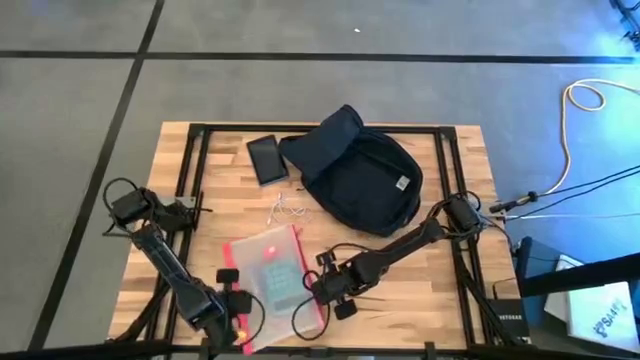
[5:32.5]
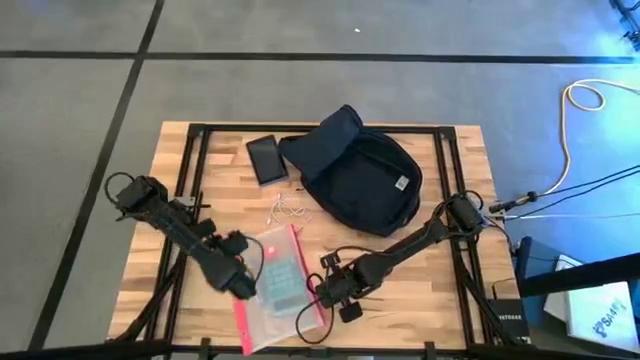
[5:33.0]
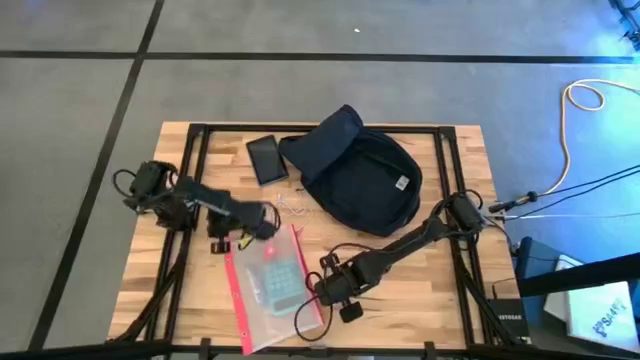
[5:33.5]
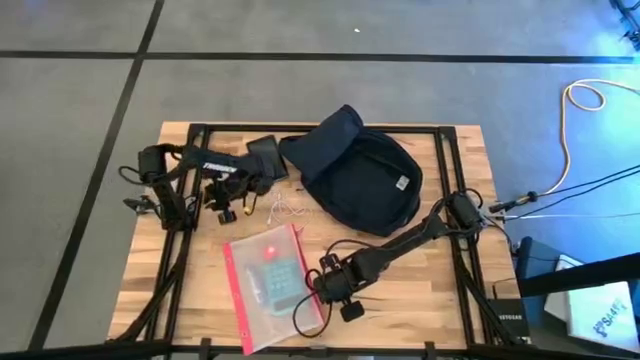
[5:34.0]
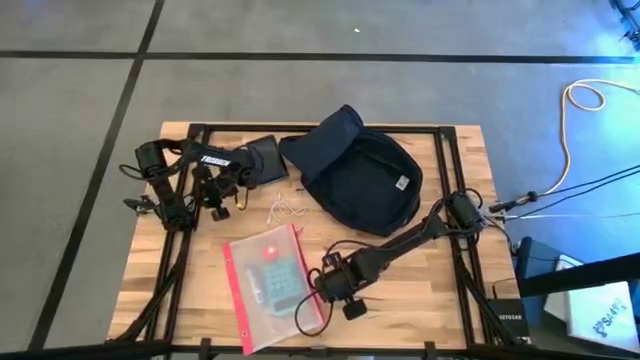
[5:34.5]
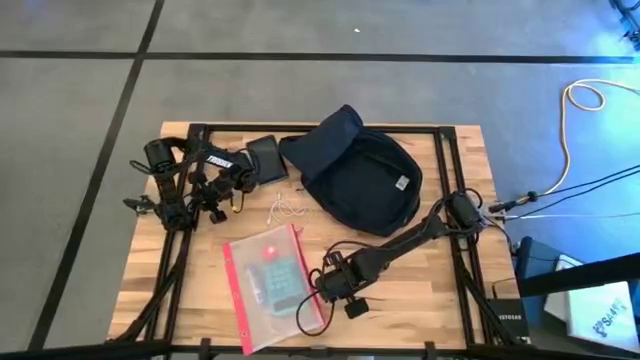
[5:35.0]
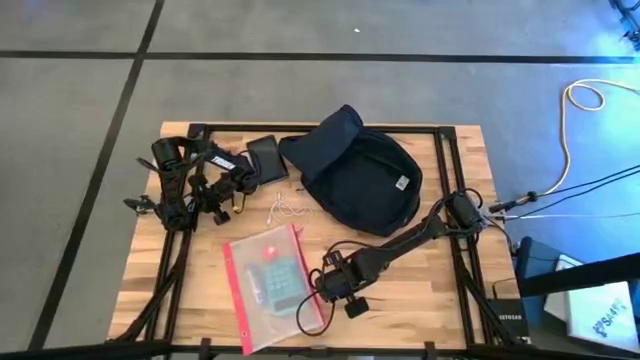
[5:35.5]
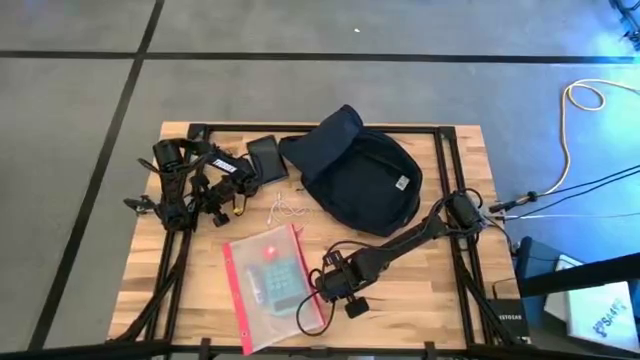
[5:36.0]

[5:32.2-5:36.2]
Task: Unpack backpack
Put the black pen into the transparent zip bag

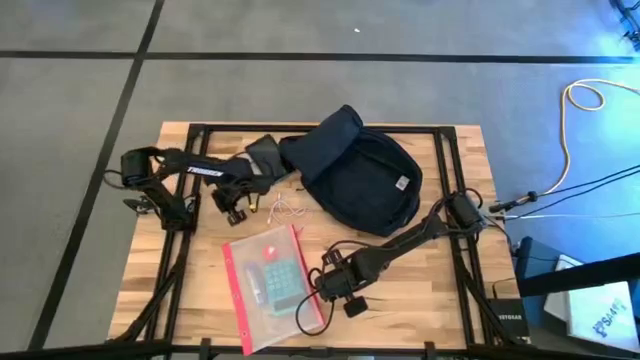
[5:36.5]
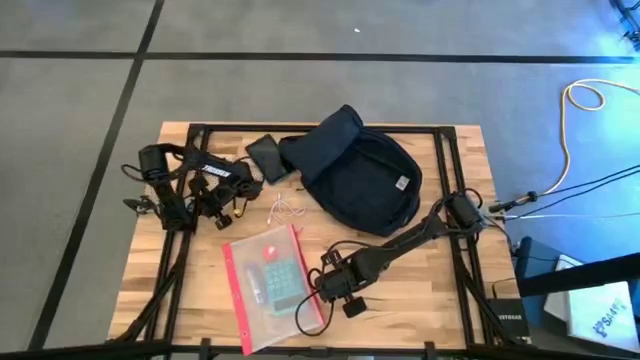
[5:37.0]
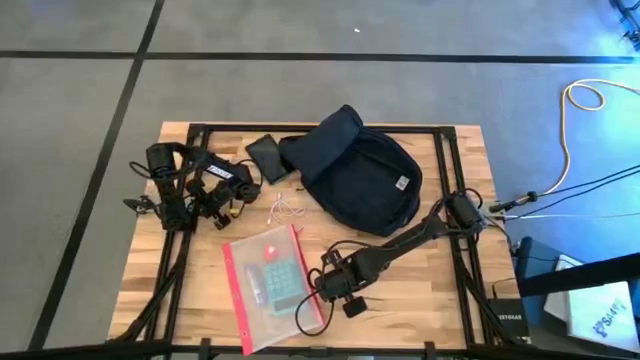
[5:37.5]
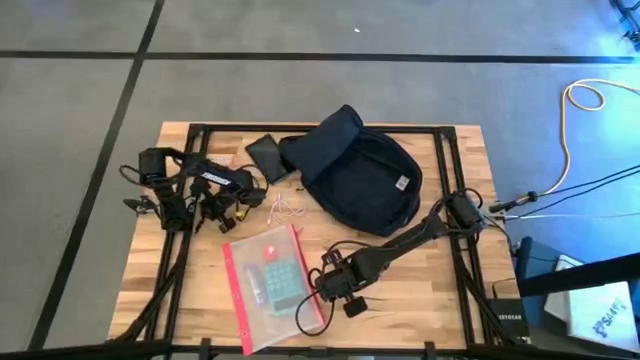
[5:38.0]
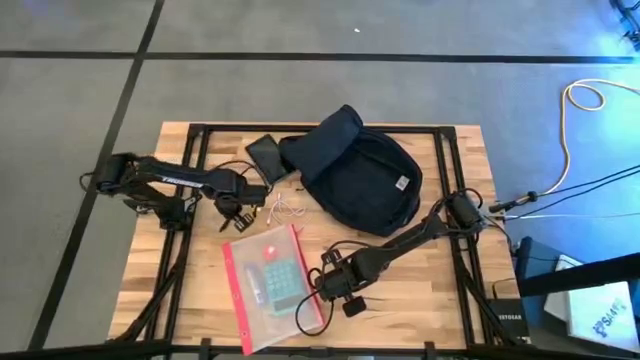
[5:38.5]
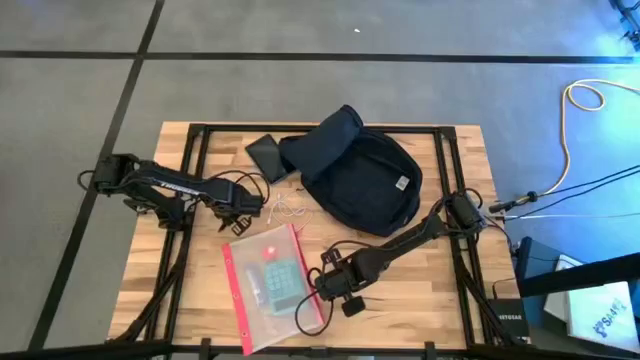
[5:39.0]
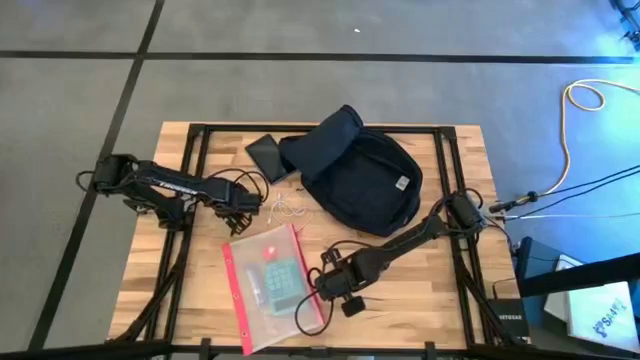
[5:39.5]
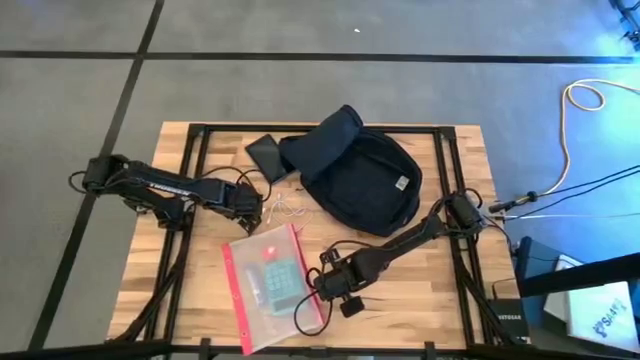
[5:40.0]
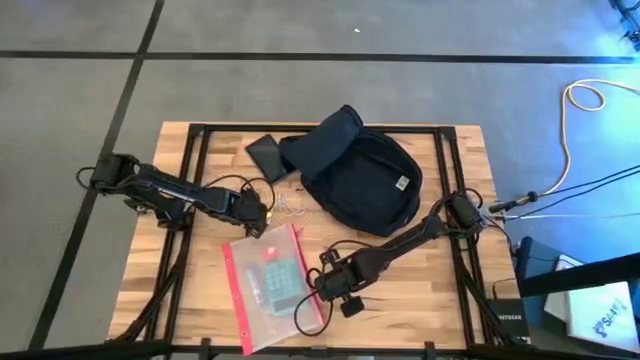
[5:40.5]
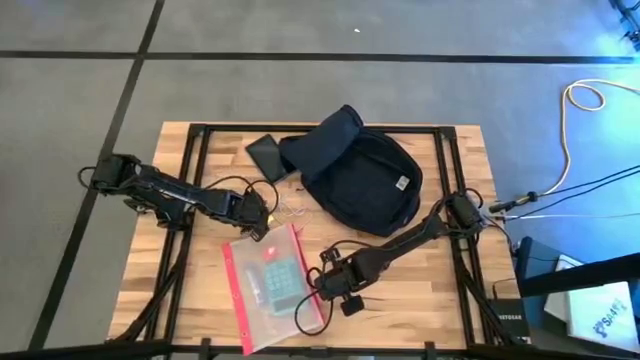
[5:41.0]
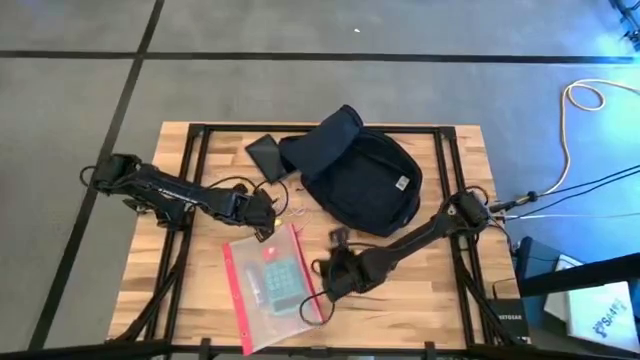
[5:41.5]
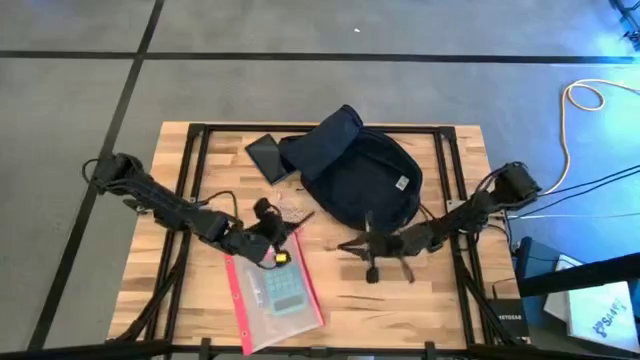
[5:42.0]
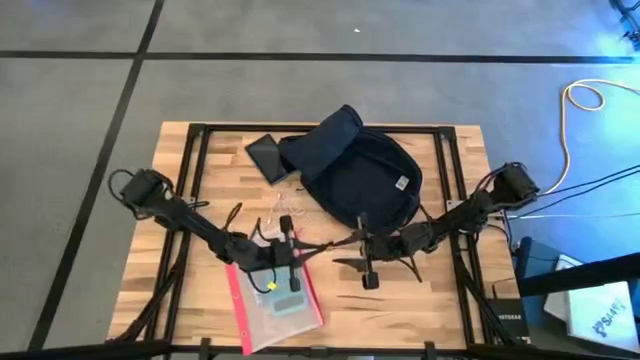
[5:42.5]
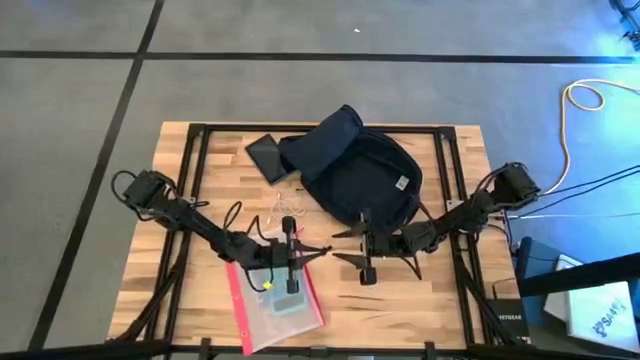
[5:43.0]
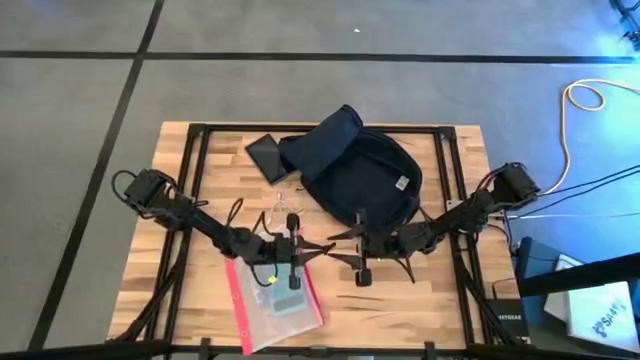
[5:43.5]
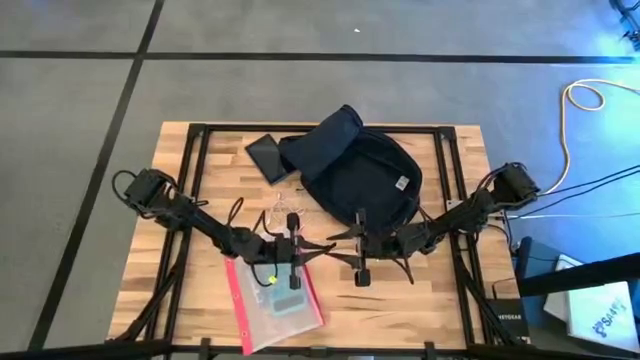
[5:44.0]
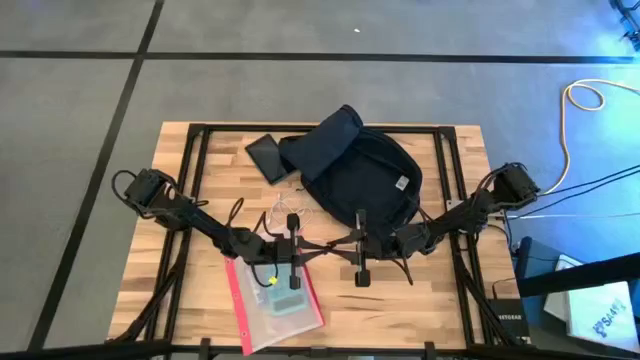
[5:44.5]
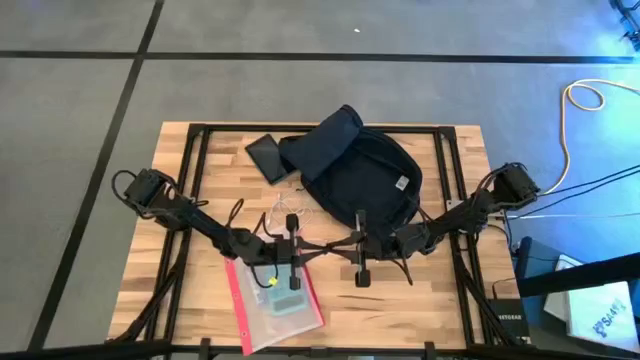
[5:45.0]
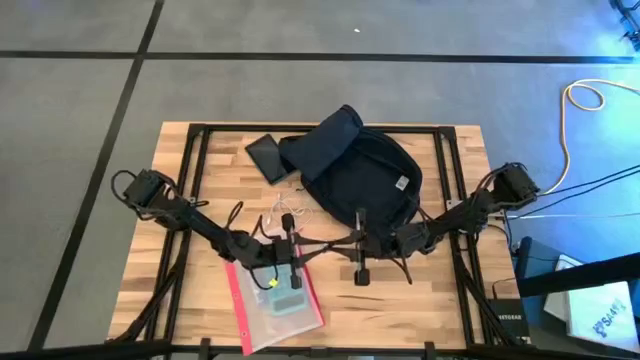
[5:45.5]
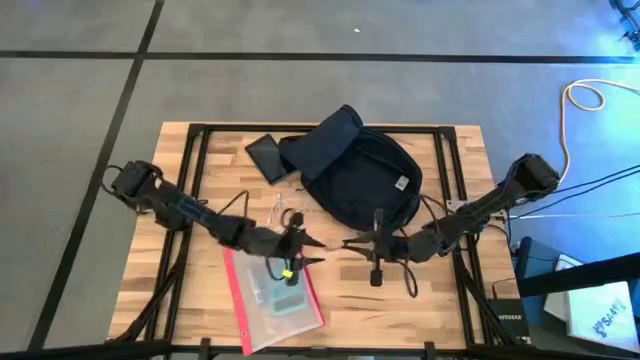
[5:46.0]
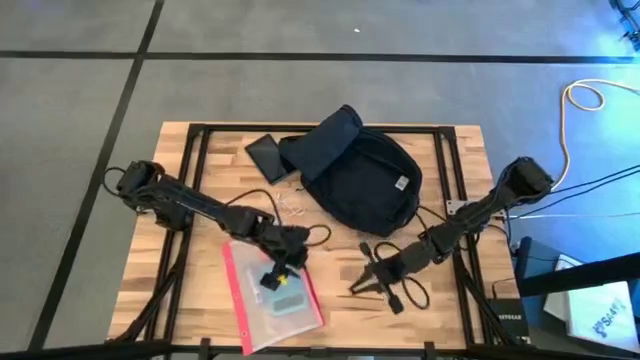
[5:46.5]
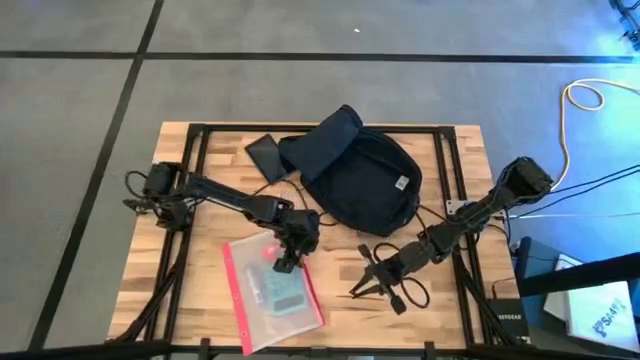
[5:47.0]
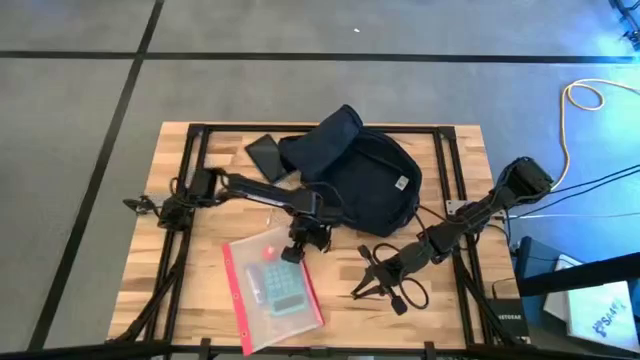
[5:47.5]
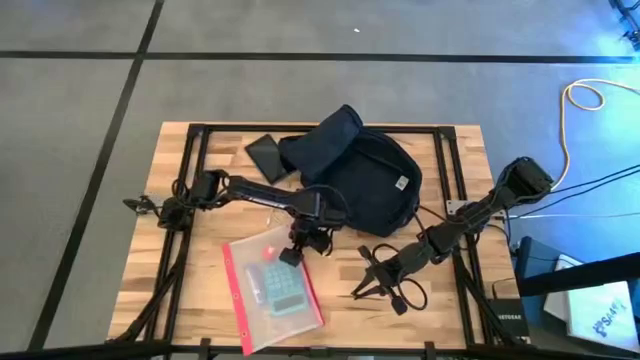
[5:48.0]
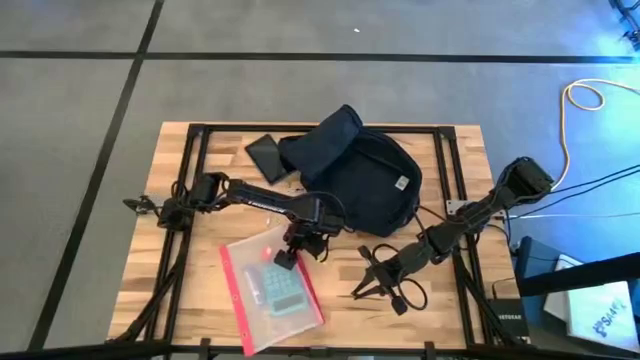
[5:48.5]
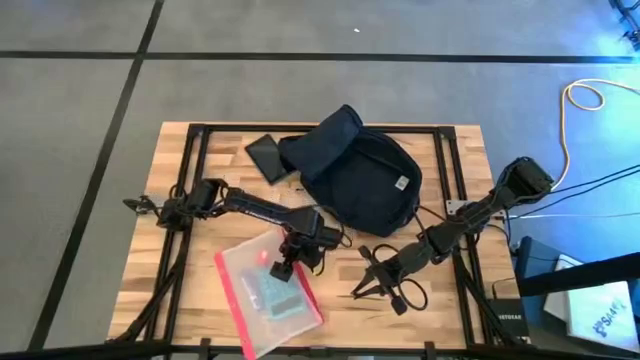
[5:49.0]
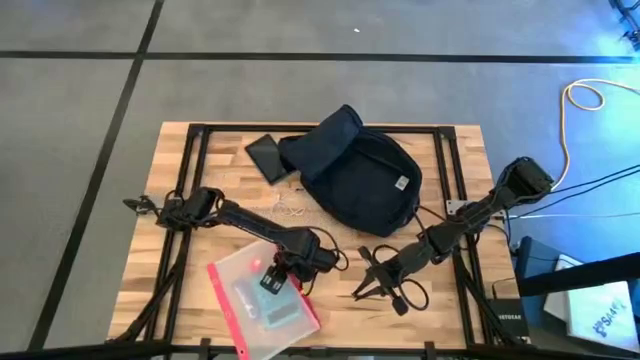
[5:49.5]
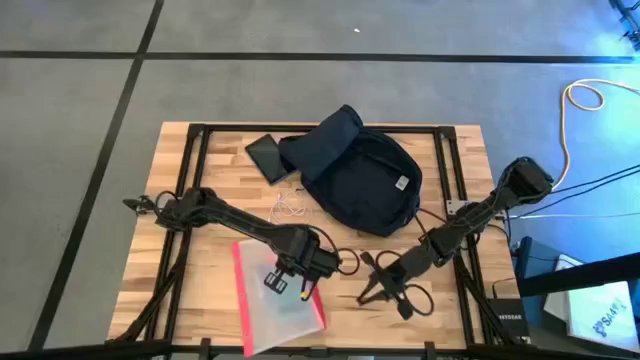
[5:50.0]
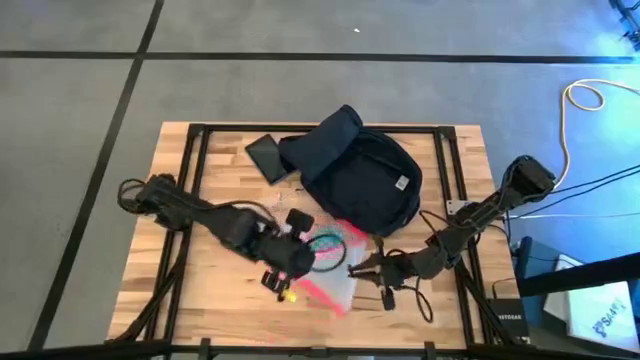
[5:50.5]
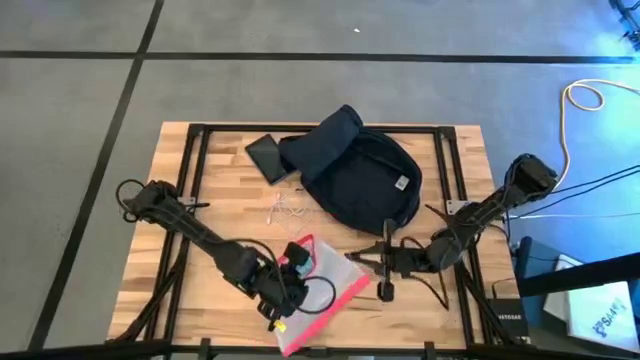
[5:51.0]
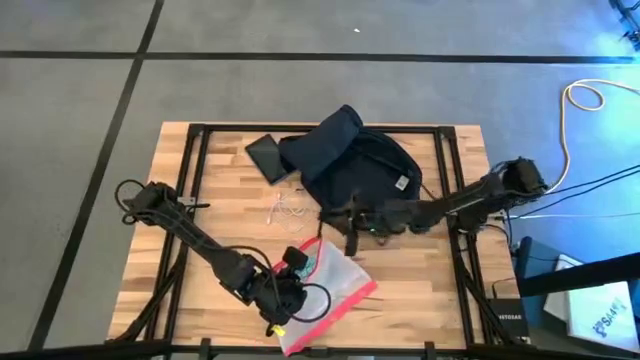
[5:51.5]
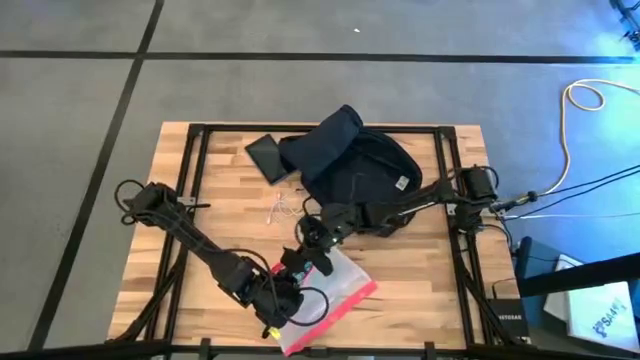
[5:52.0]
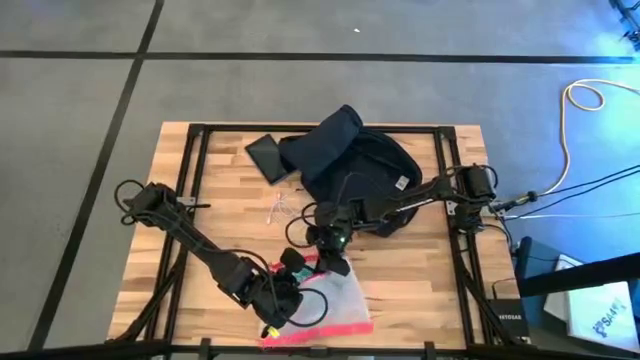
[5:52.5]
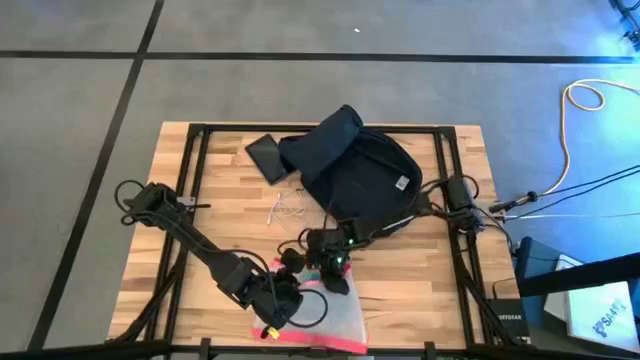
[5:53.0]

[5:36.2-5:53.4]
Put the black pen into the transparent zip bag
